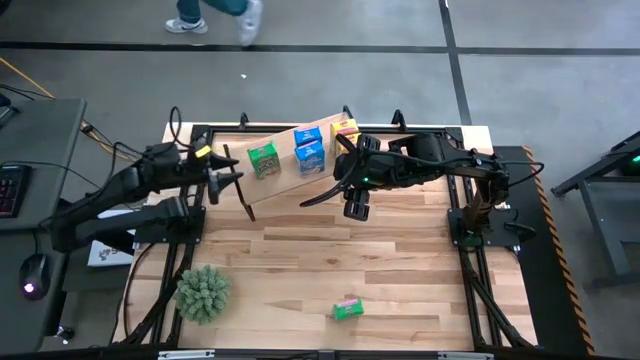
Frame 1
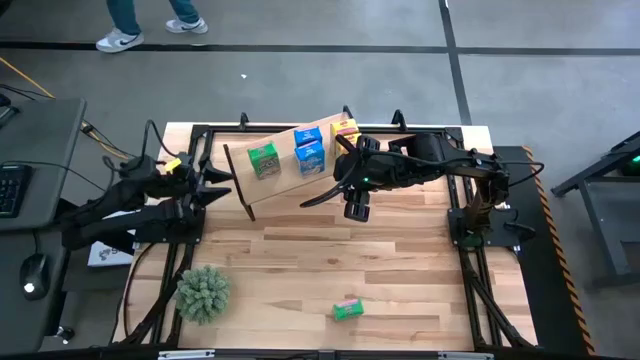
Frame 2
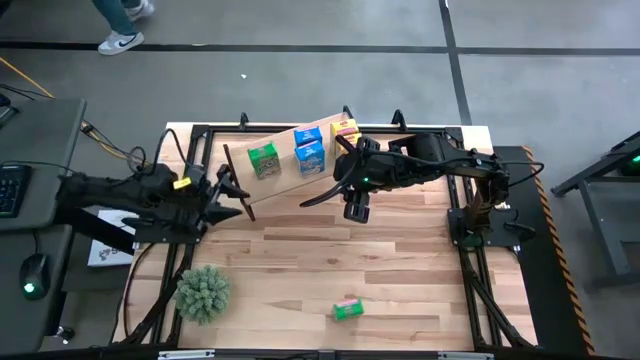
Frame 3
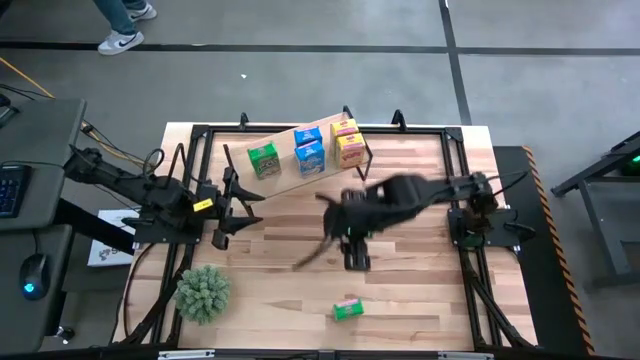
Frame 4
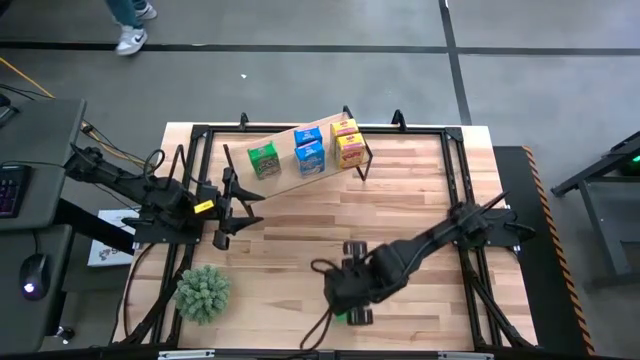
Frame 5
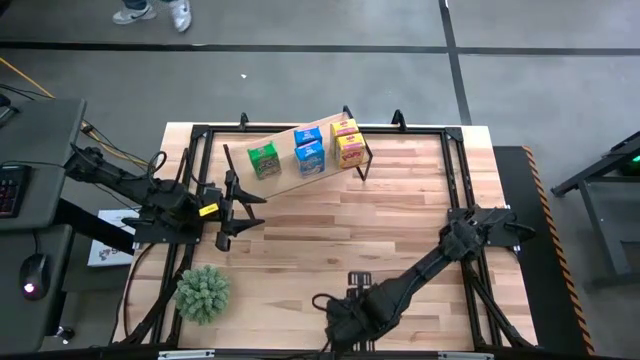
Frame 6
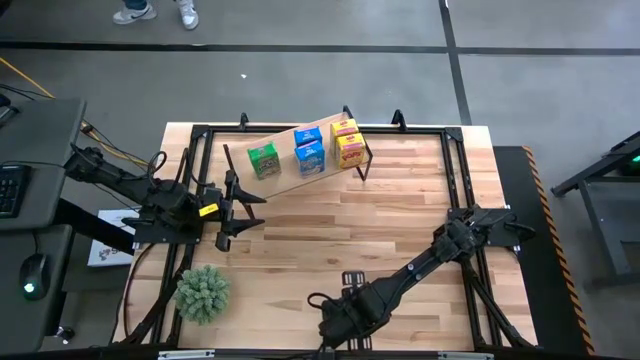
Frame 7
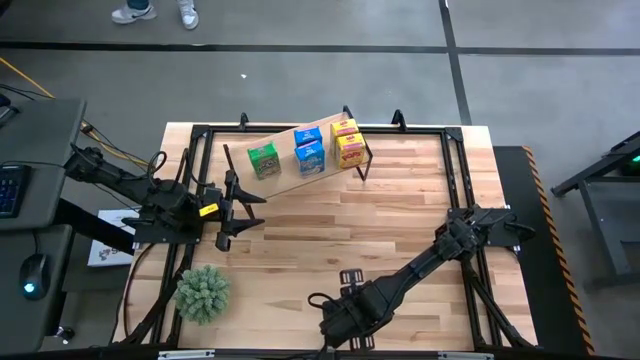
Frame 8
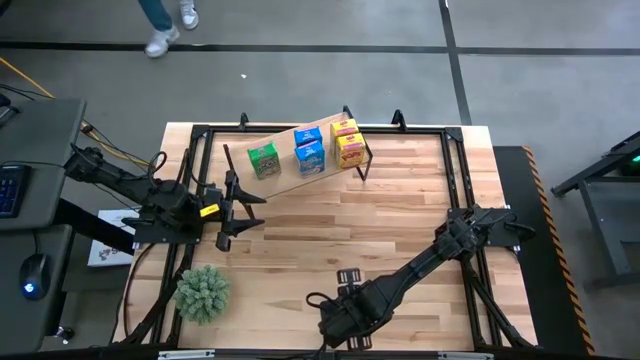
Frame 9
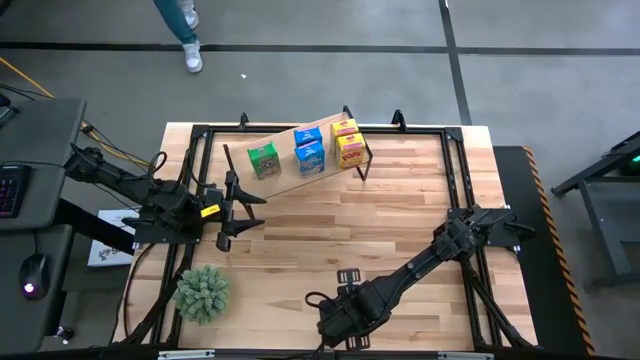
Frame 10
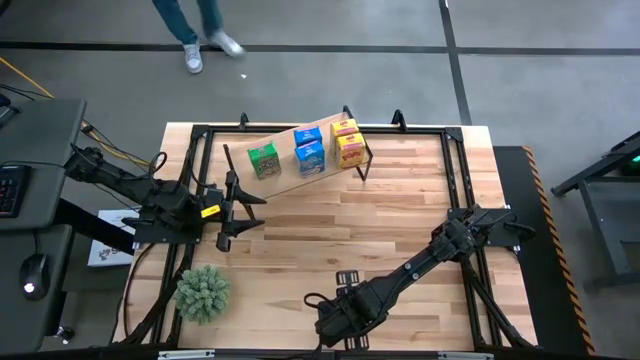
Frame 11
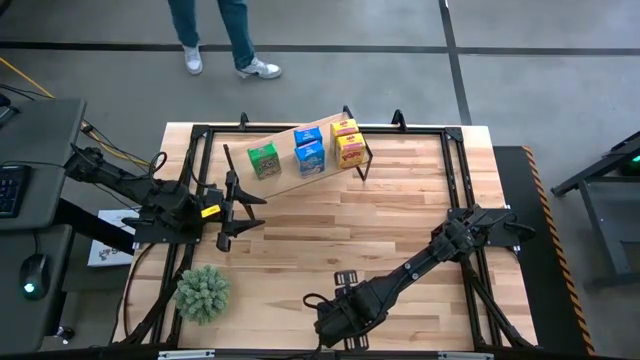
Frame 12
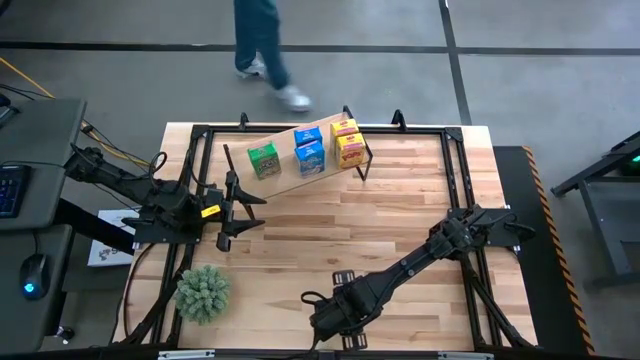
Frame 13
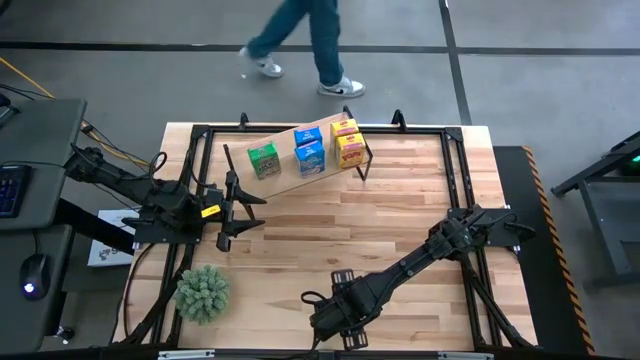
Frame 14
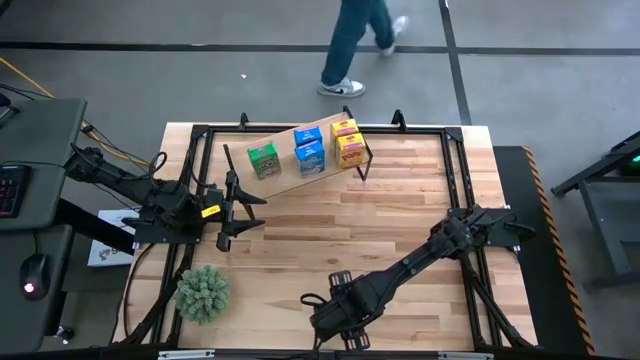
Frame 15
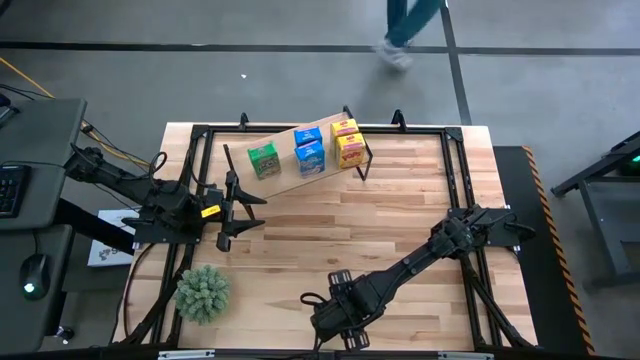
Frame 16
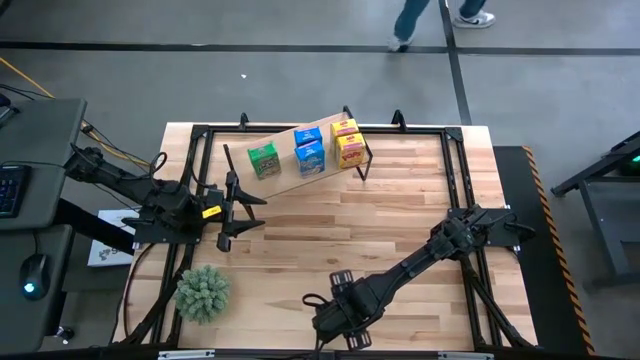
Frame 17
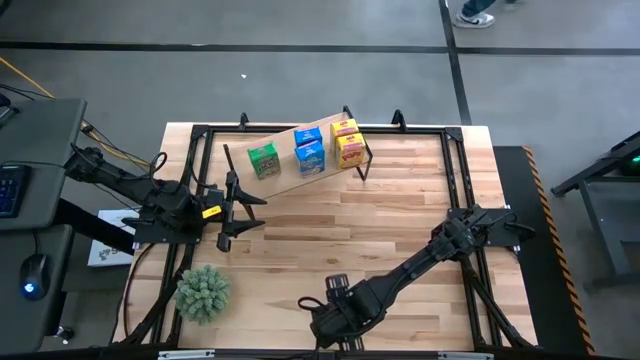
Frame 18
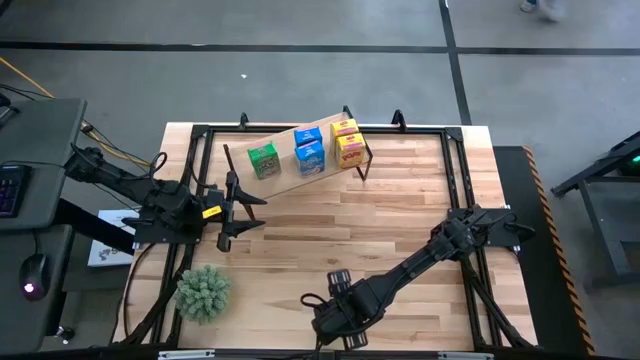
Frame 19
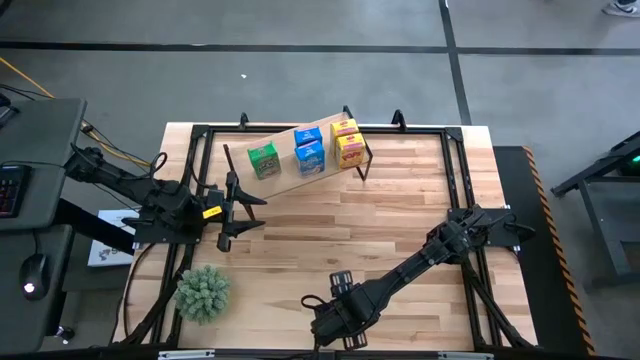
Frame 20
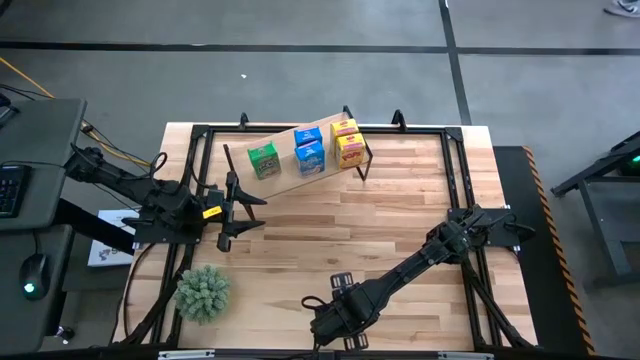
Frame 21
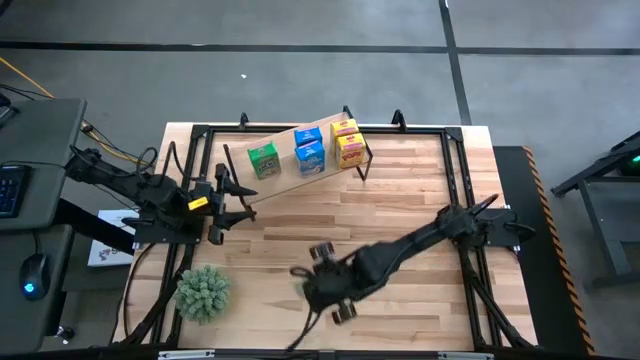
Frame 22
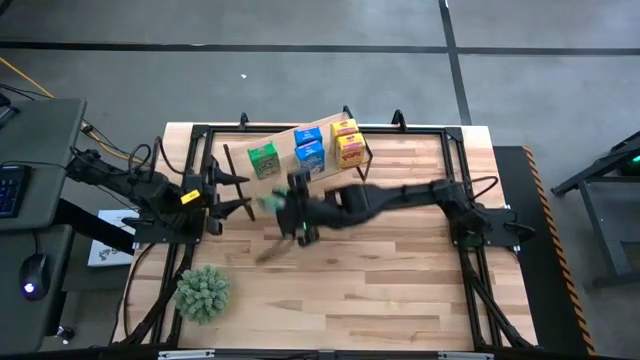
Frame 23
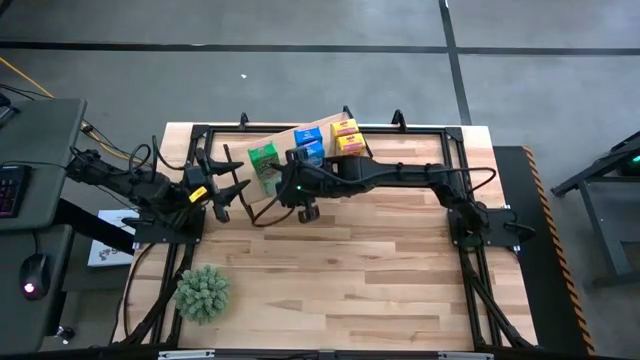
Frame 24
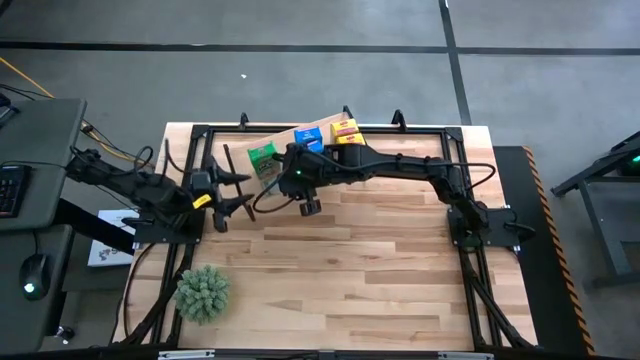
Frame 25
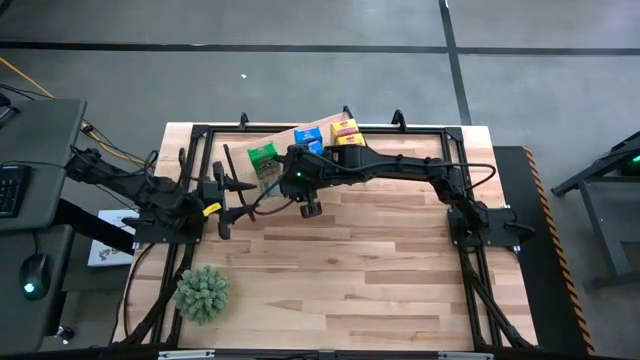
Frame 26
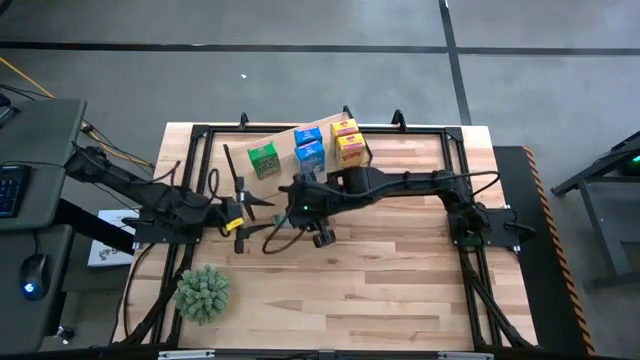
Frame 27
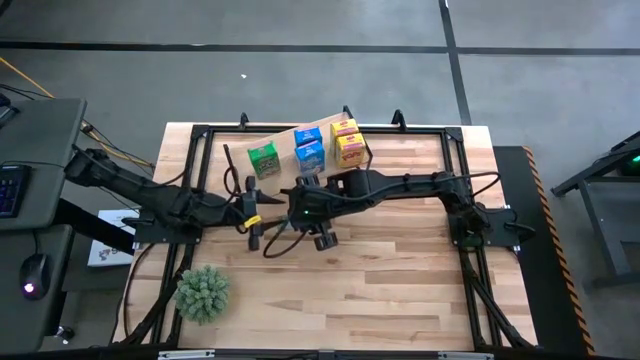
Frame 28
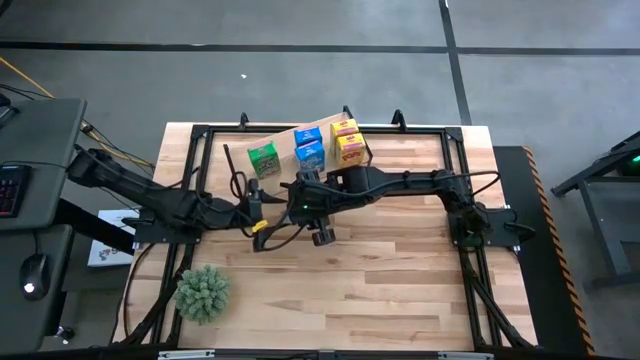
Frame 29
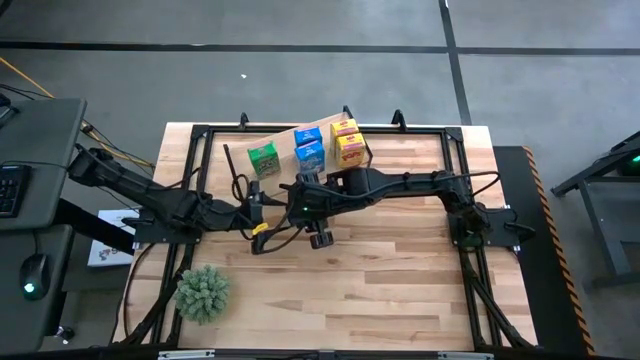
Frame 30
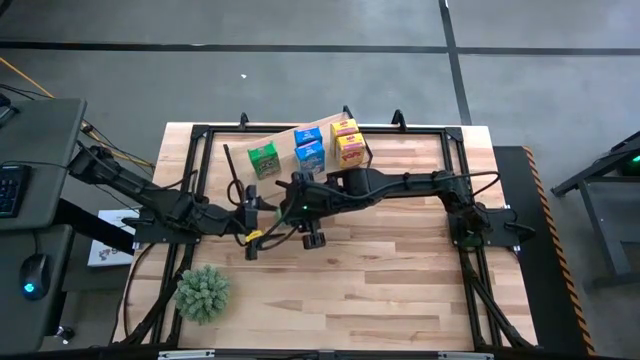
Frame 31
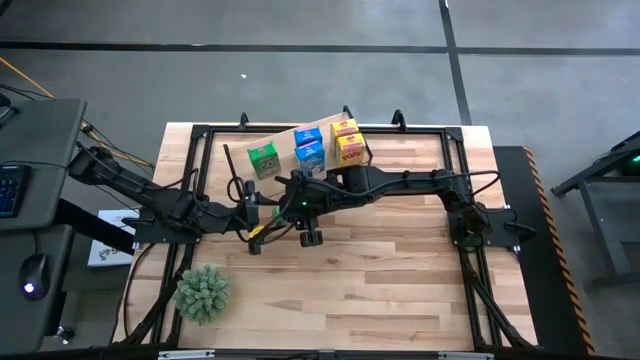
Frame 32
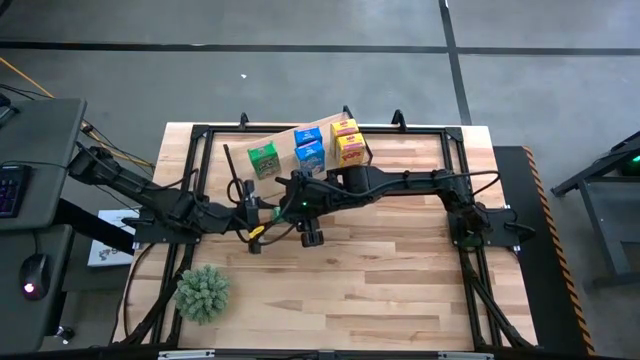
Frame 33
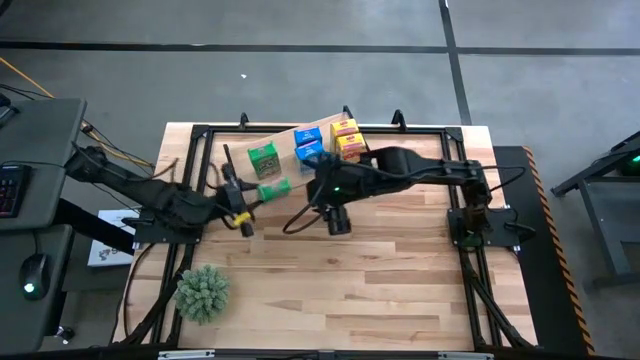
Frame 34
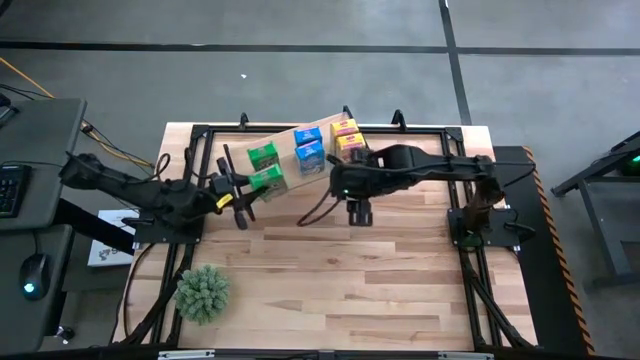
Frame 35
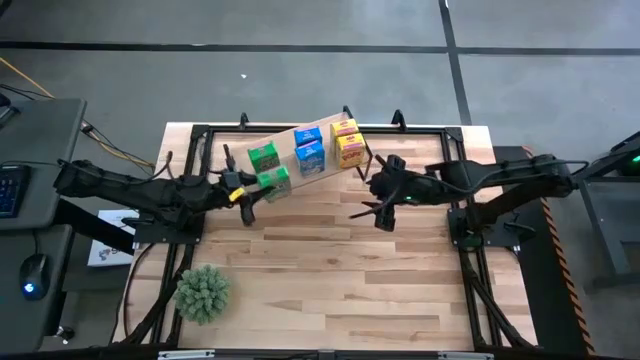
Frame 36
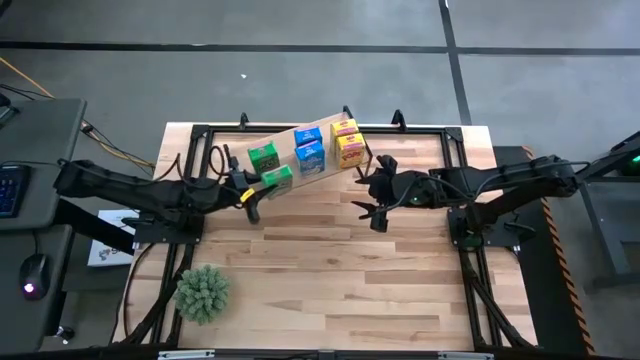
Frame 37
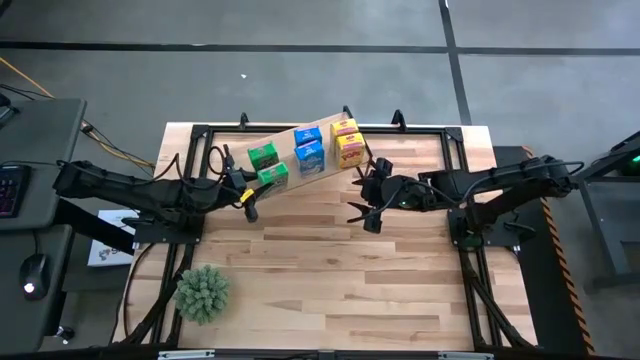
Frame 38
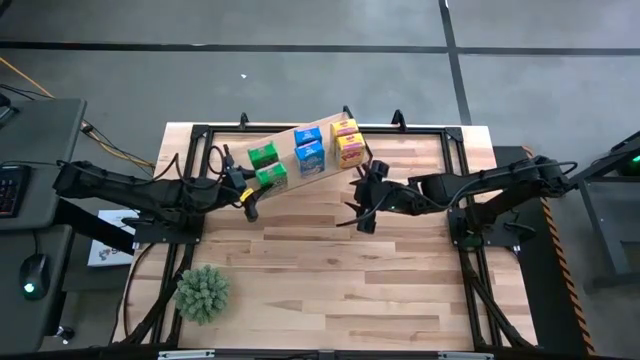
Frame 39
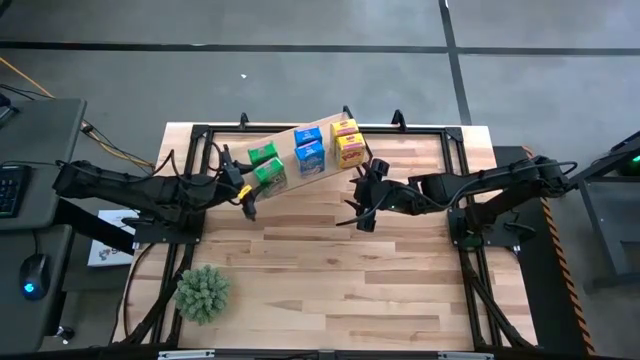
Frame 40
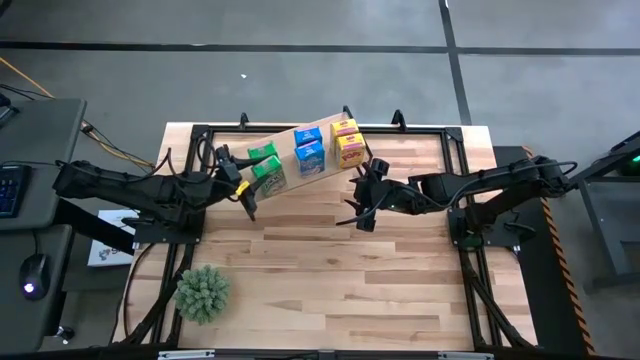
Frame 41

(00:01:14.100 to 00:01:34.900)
Task: Stack cereal on shelf
Put the green cereal box on the shelf aligned with the green cereal box
